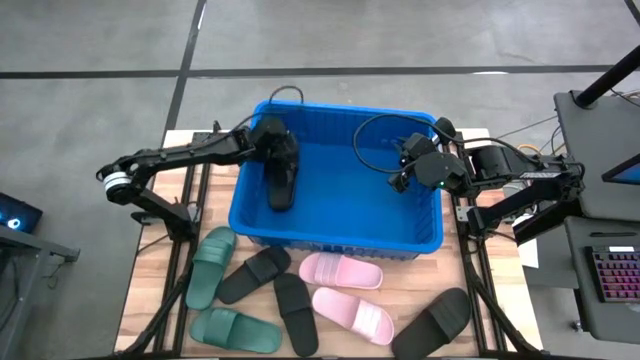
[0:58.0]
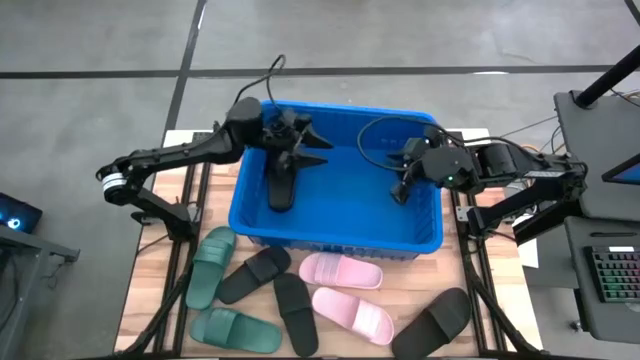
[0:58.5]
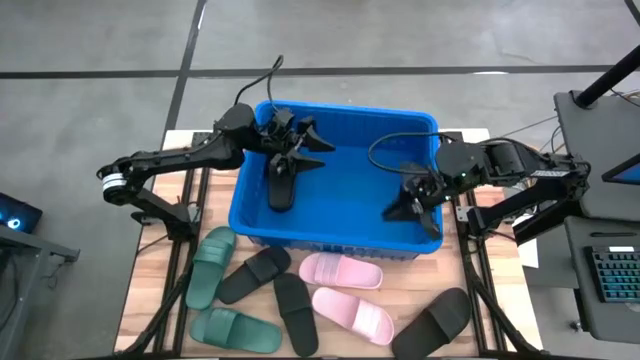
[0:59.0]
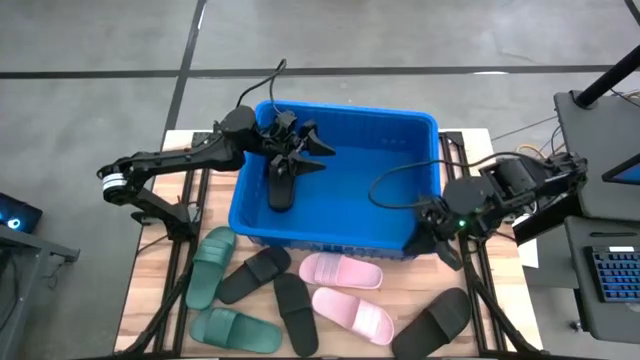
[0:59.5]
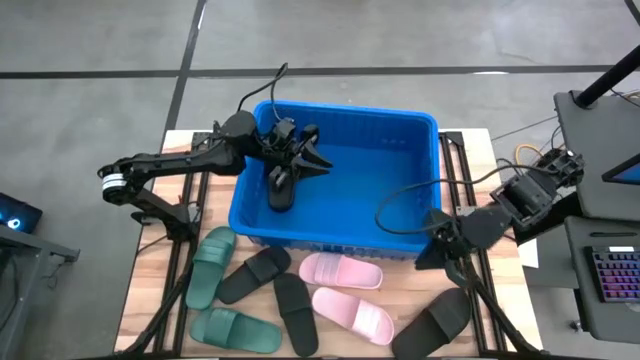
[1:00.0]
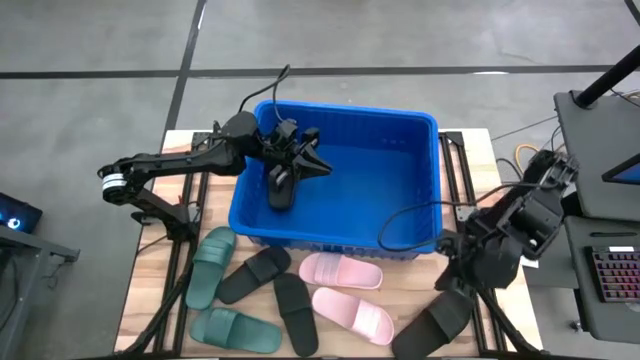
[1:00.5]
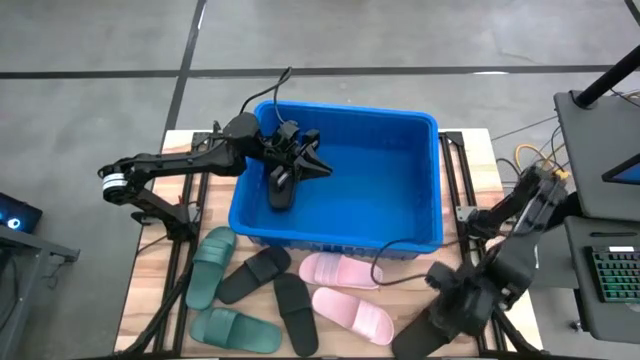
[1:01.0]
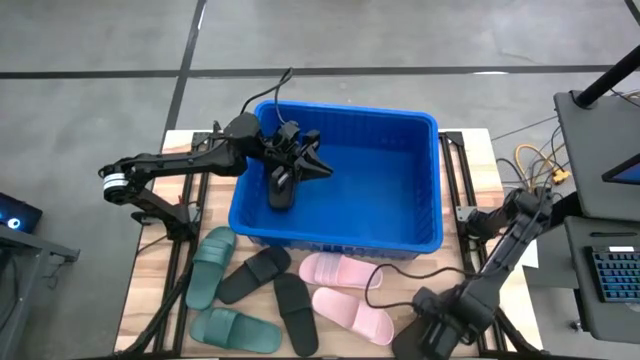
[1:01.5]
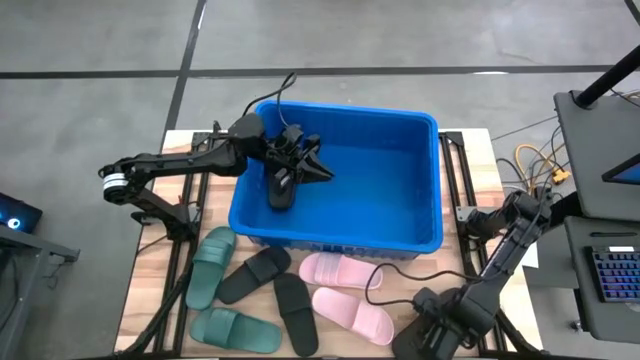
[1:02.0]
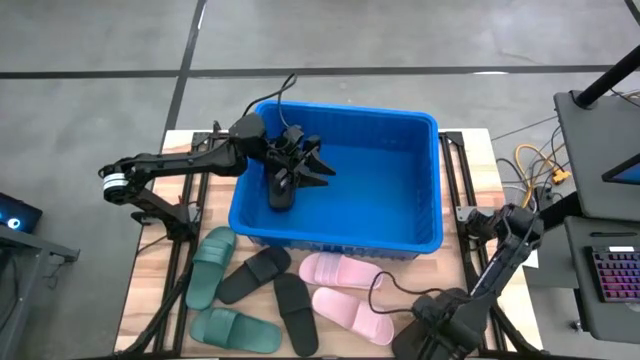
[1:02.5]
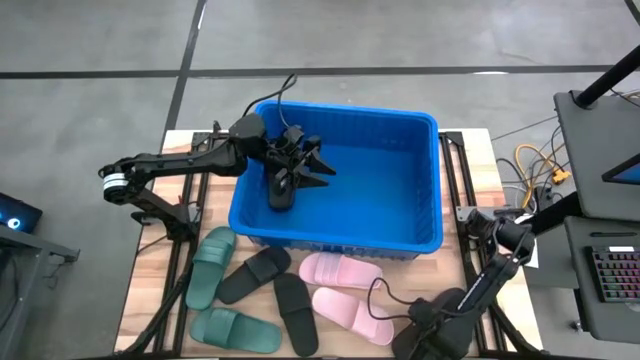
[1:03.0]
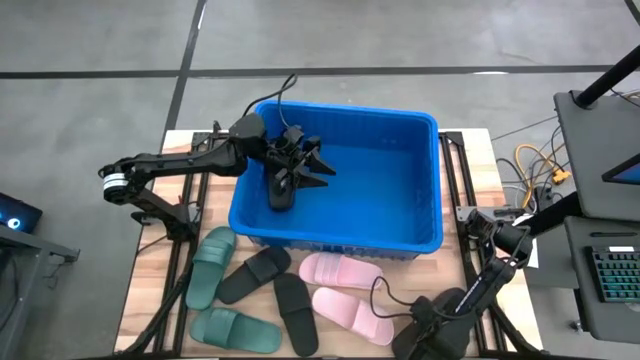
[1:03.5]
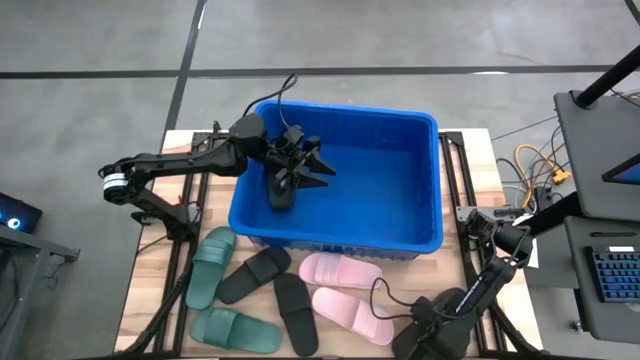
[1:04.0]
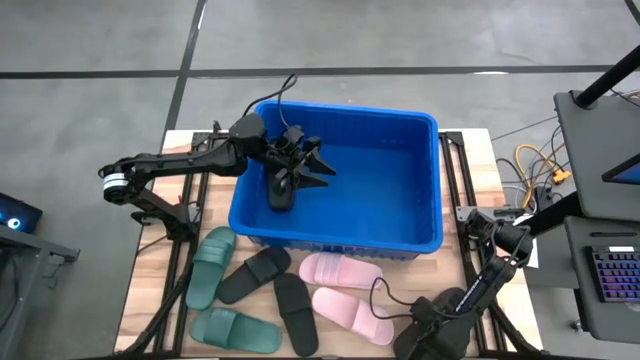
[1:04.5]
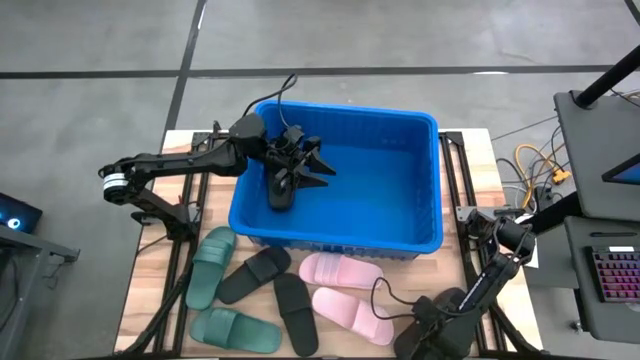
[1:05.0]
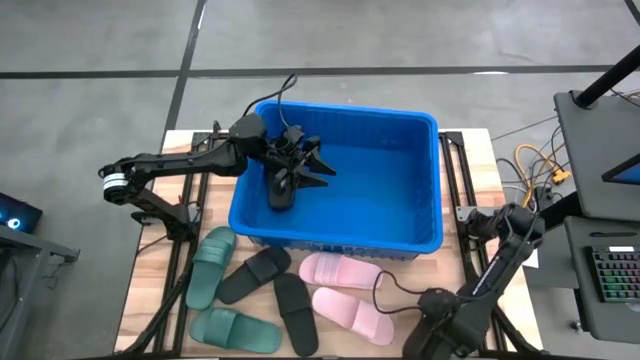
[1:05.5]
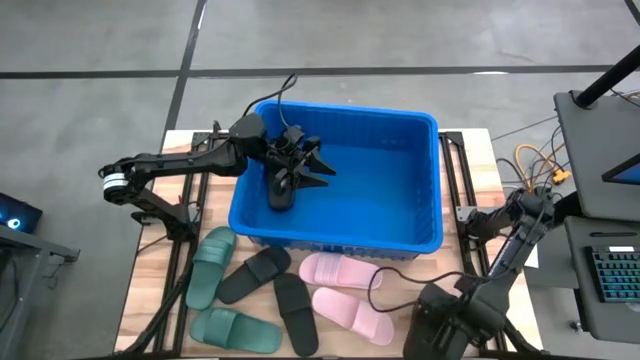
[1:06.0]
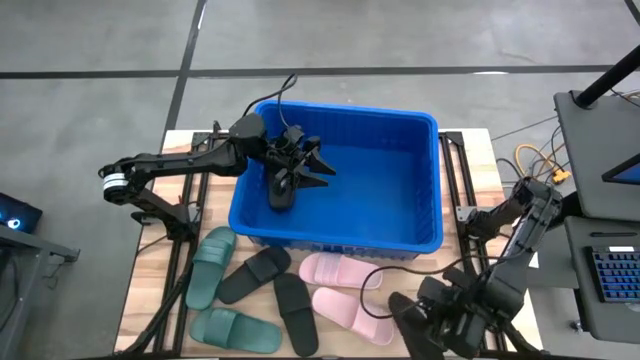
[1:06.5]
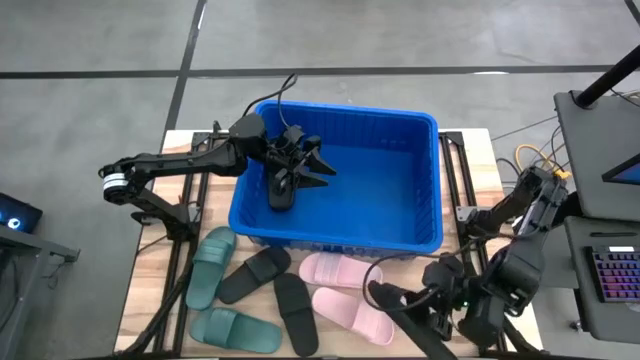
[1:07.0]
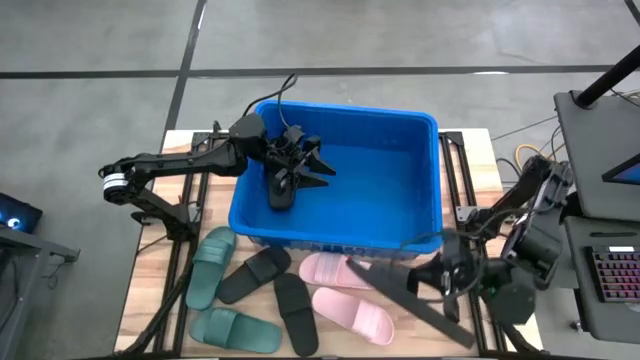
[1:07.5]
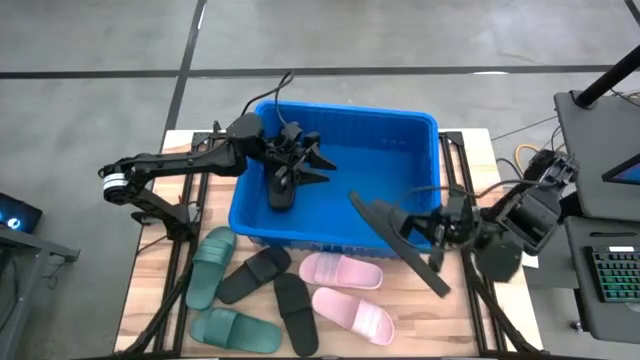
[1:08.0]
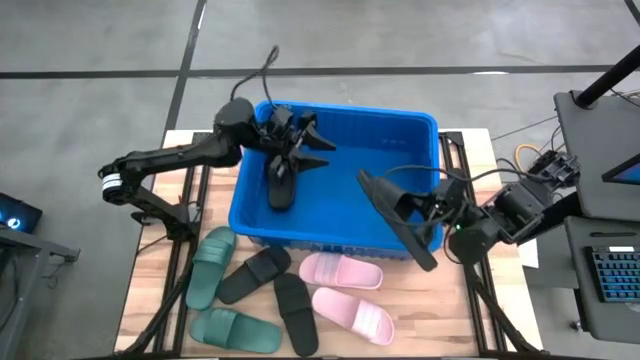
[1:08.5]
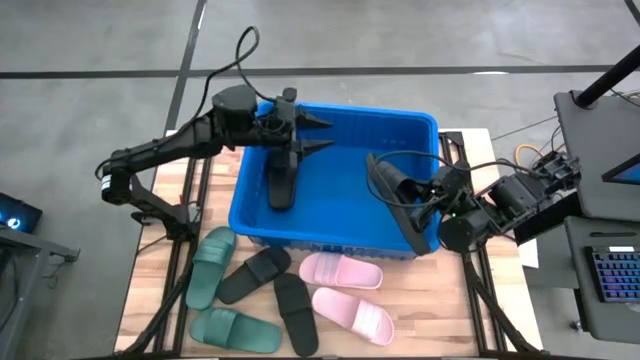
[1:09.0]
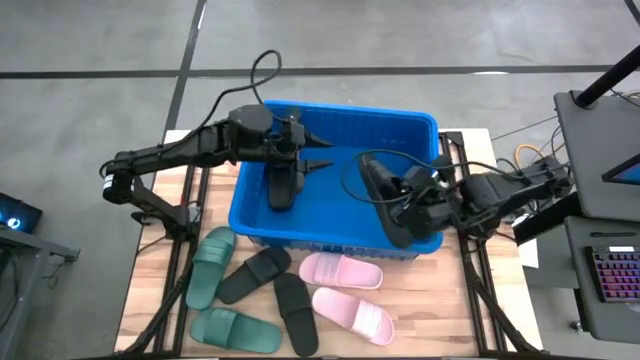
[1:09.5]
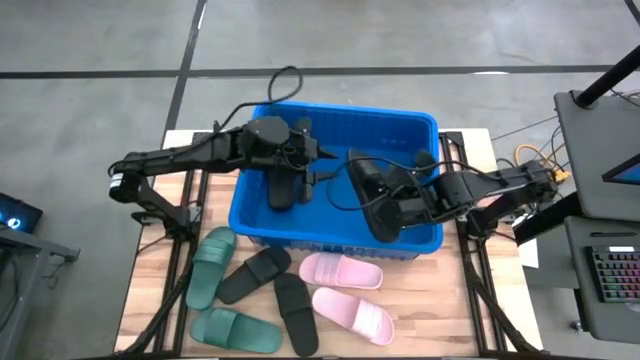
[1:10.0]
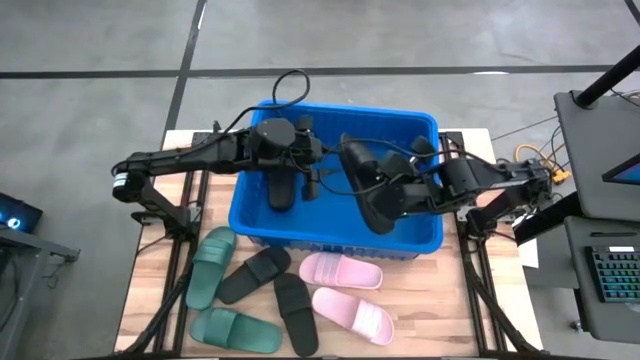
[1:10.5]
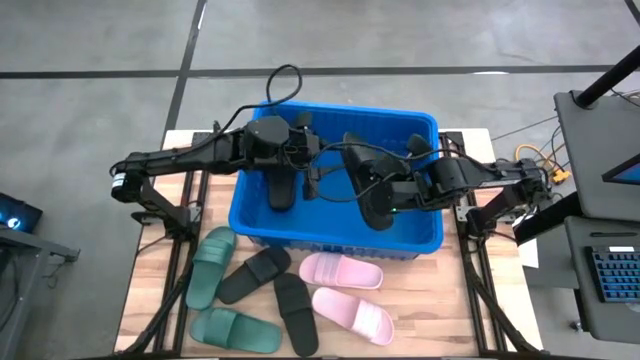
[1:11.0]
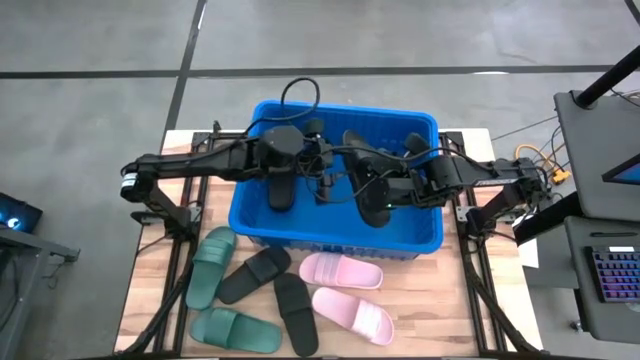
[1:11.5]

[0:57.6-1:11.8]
Task: Pick and place slides into bin
Put the Bottom right black slide into the blue bin

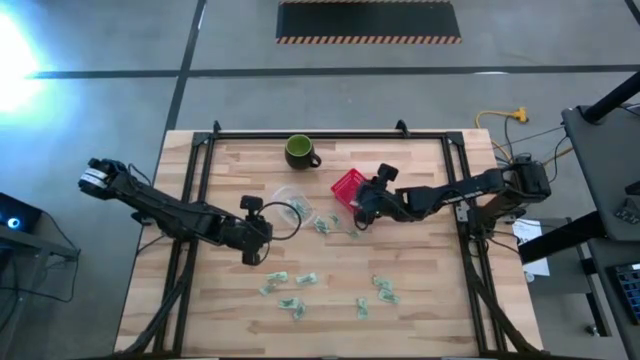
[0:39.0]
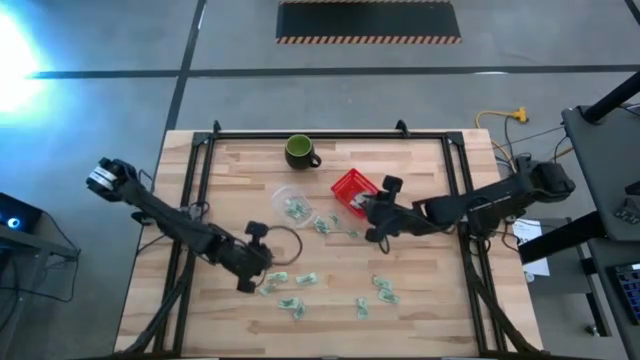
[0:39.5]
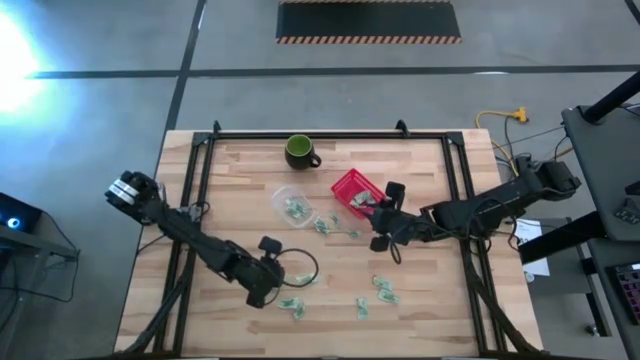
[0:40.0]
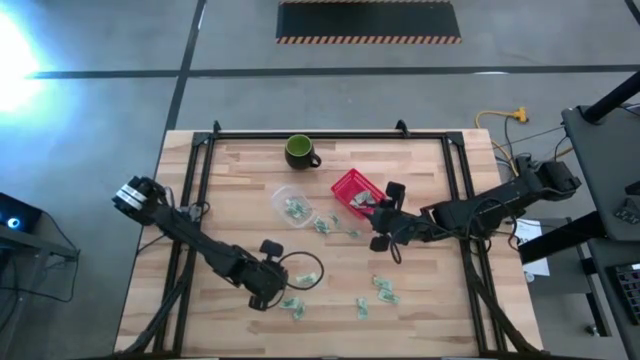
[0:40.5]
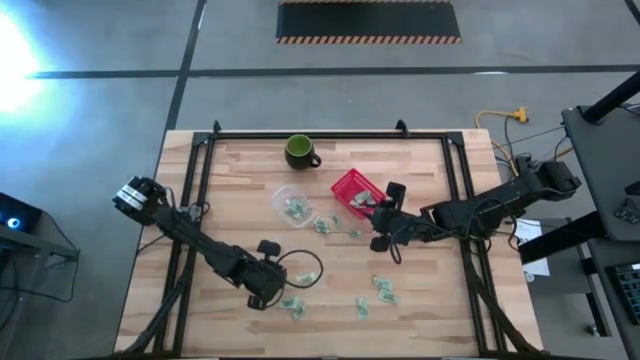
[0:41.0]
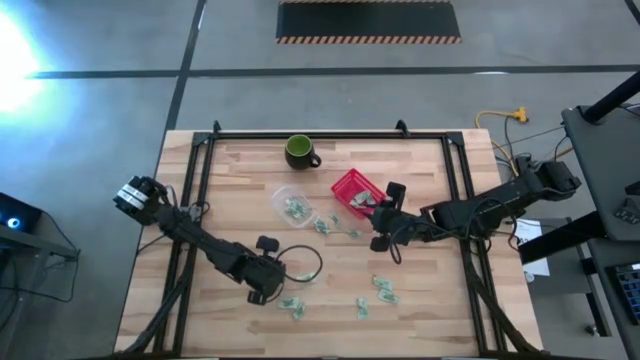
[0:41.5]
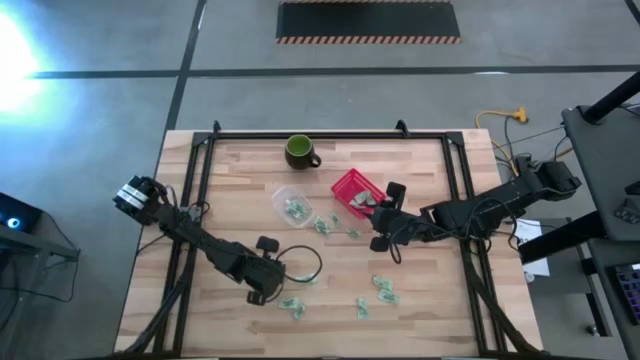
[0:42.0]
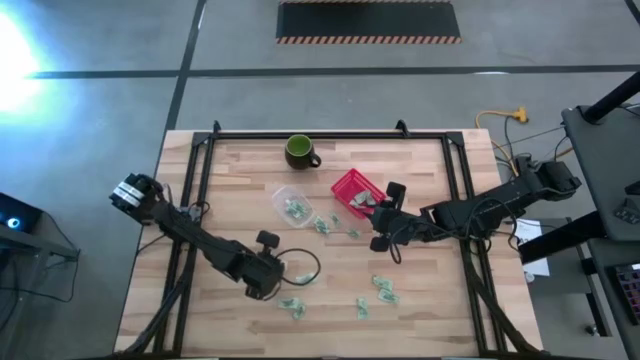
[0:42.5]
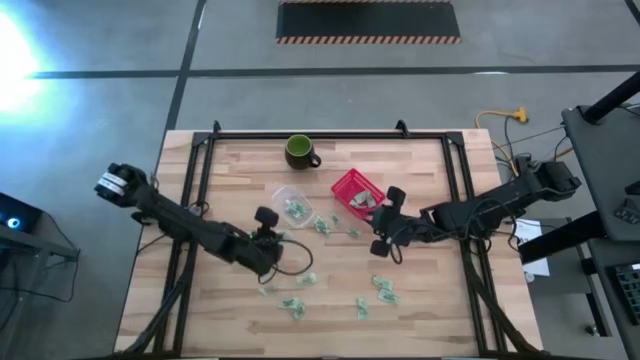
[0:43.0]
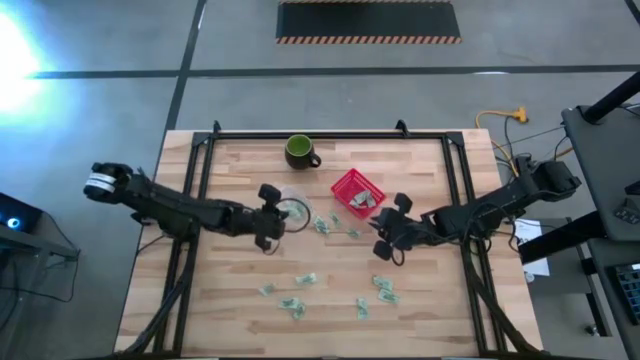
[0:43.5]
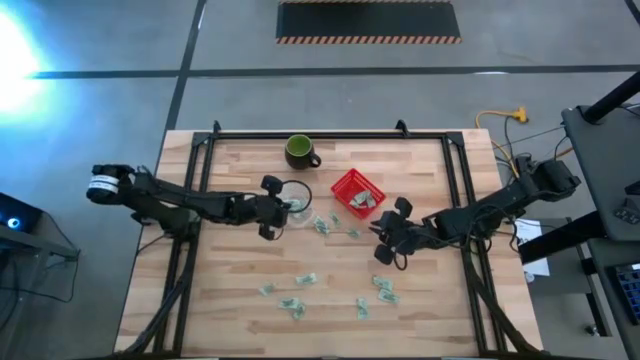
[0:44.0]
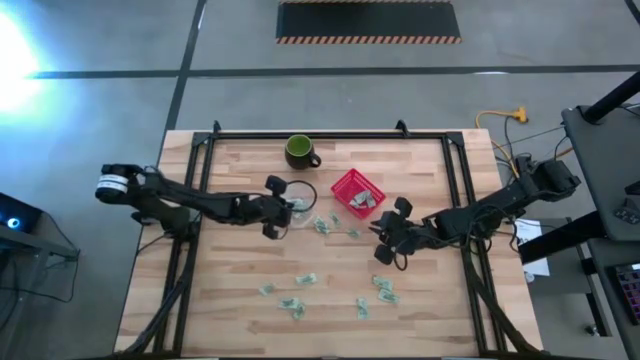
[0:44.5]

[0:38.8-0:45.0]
Task: Pick and place items into bin
Put the stevia packet into the transparent bin

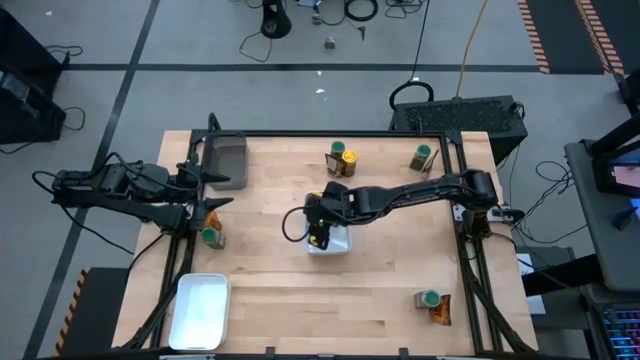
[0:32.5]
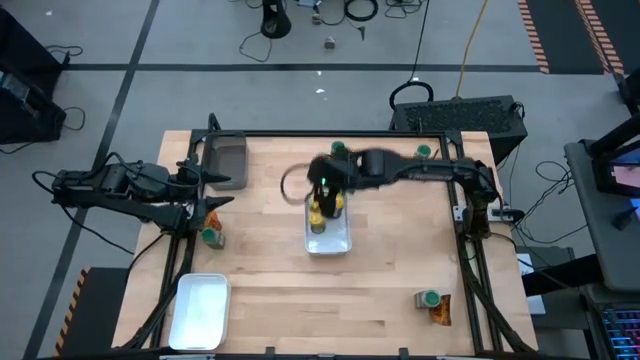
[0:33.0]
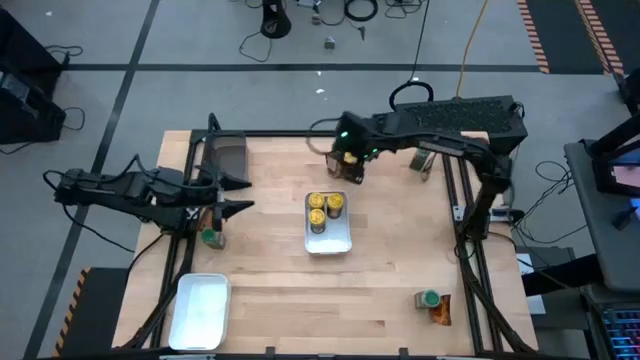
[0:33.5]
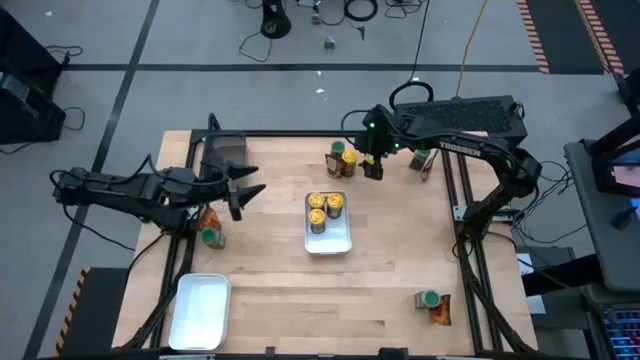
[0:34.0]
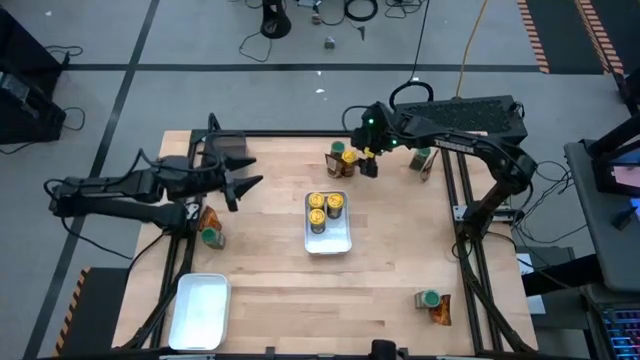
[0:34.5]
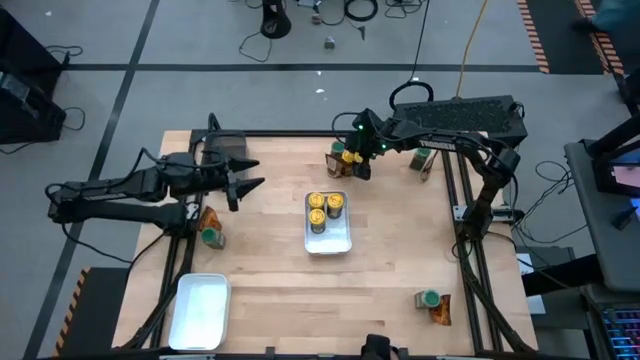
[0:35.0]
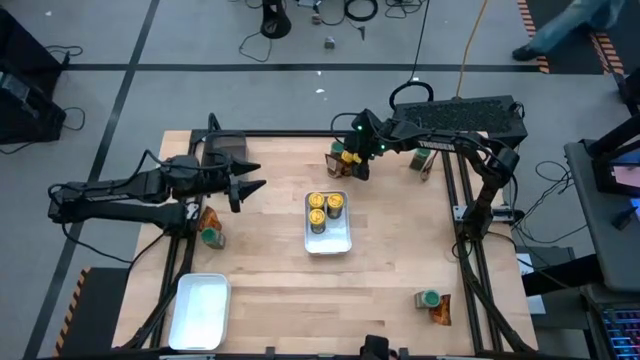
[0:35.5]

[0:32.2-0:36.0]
Task: Sort spices by type
Put the yellow spice bottle into the top white bin
